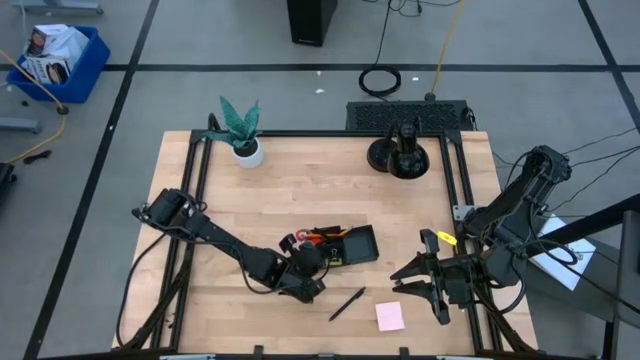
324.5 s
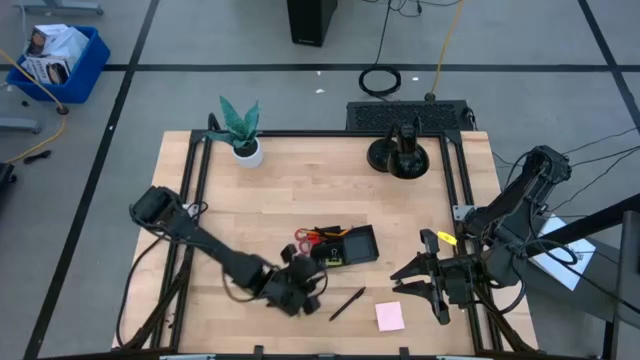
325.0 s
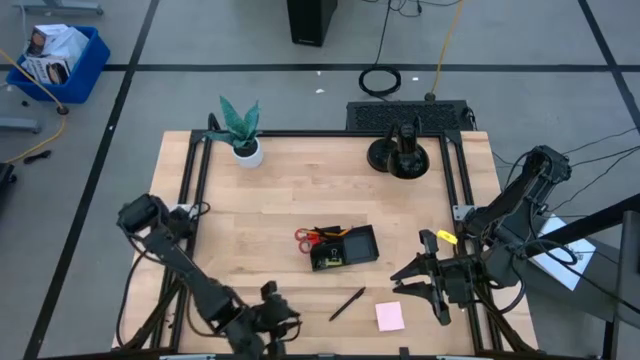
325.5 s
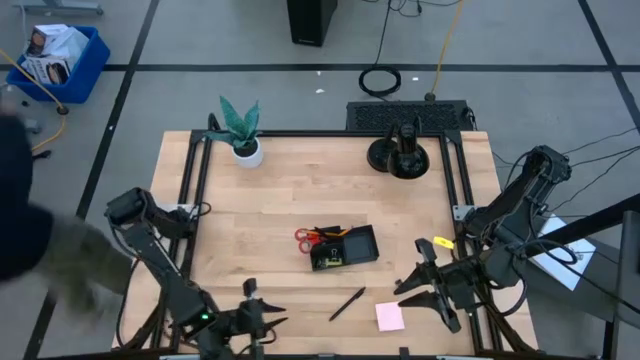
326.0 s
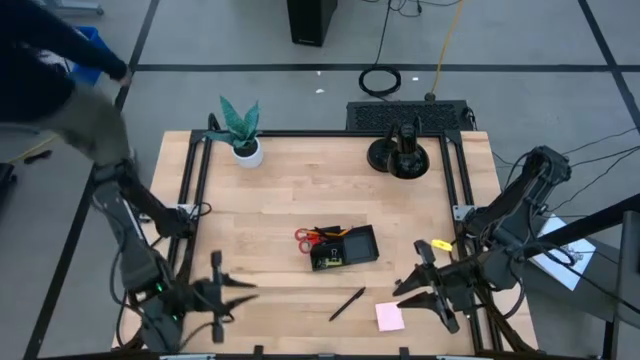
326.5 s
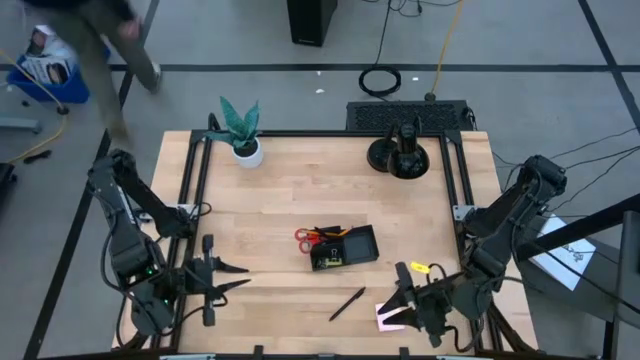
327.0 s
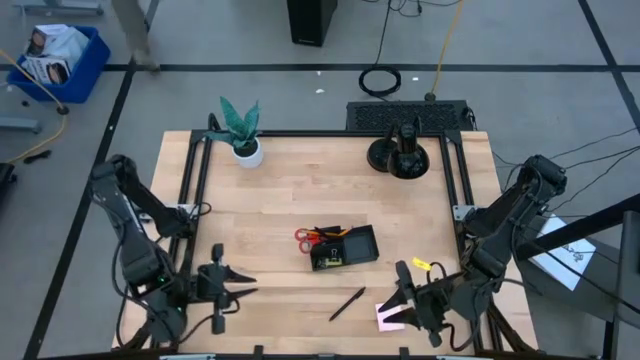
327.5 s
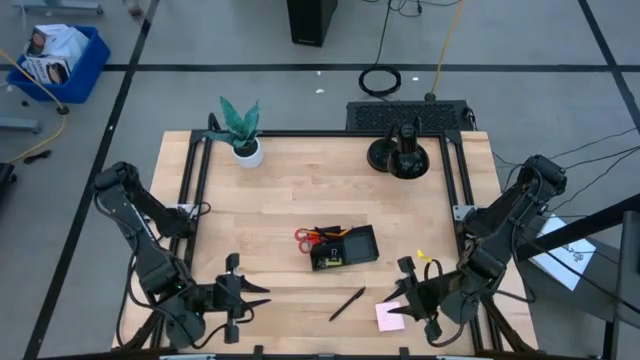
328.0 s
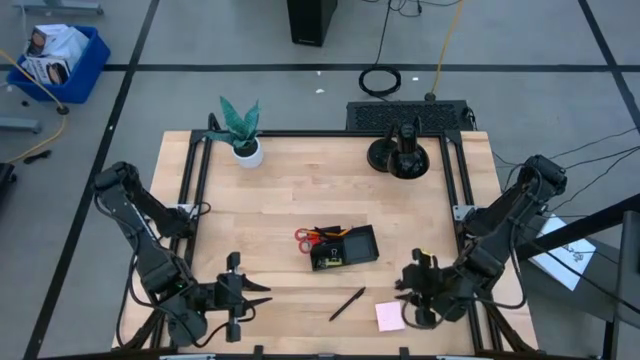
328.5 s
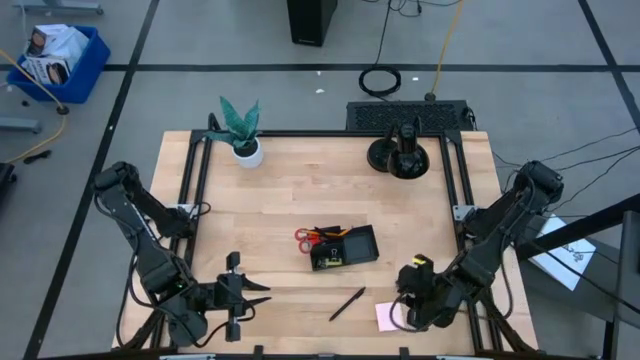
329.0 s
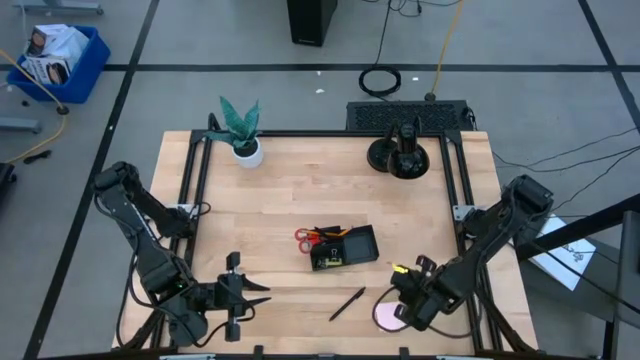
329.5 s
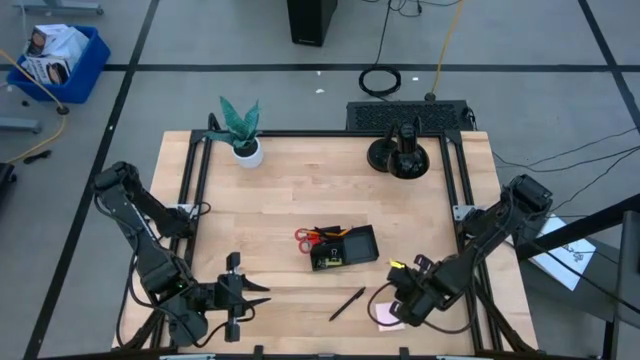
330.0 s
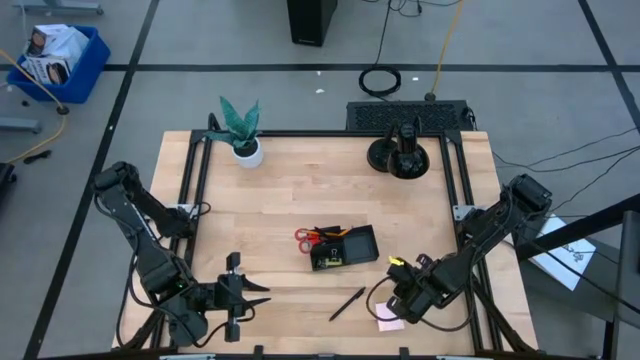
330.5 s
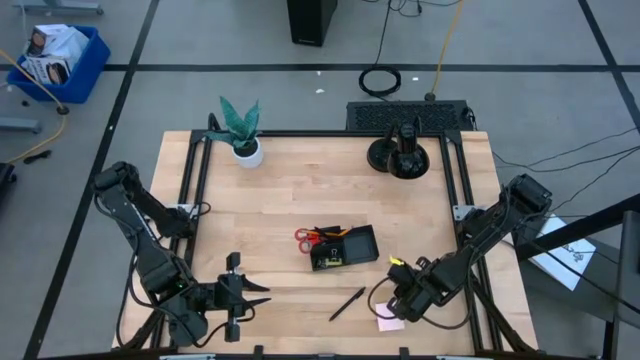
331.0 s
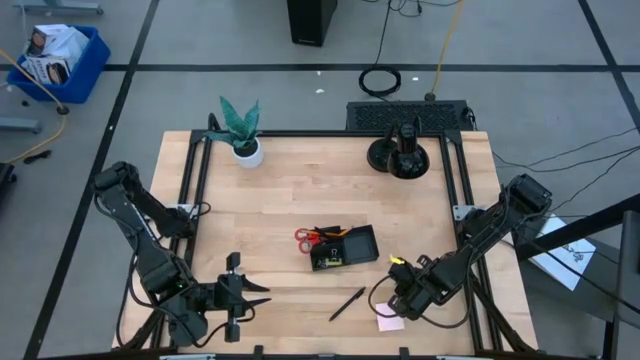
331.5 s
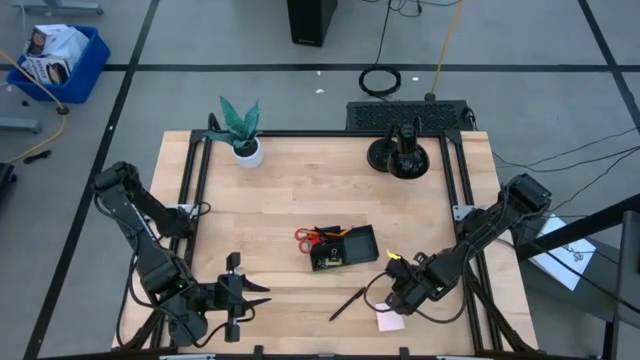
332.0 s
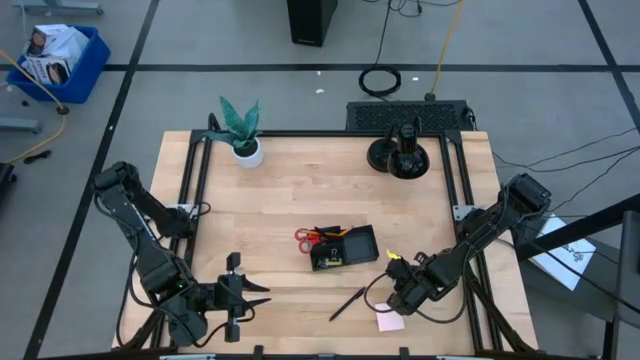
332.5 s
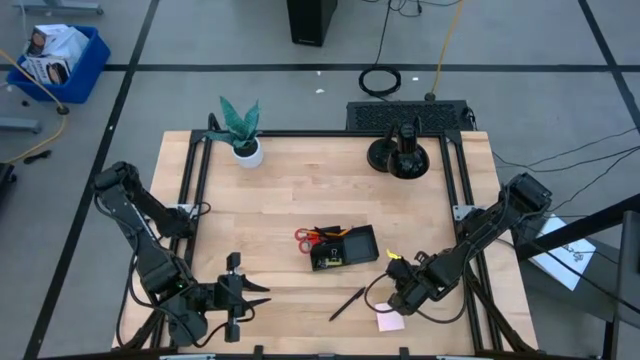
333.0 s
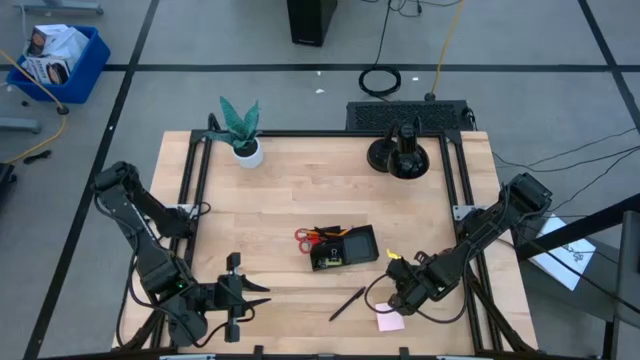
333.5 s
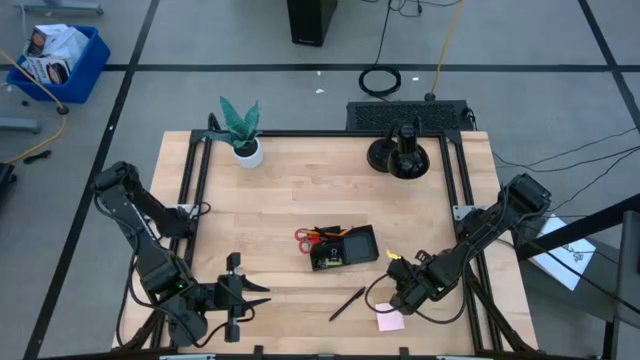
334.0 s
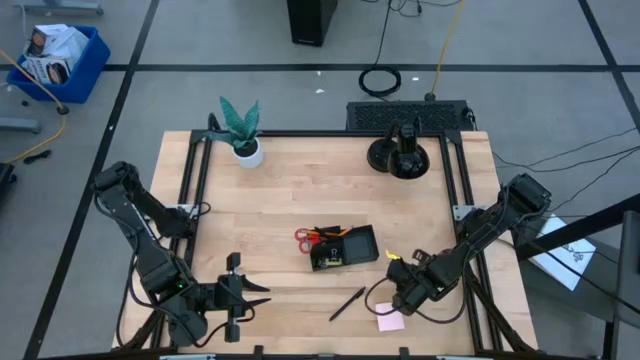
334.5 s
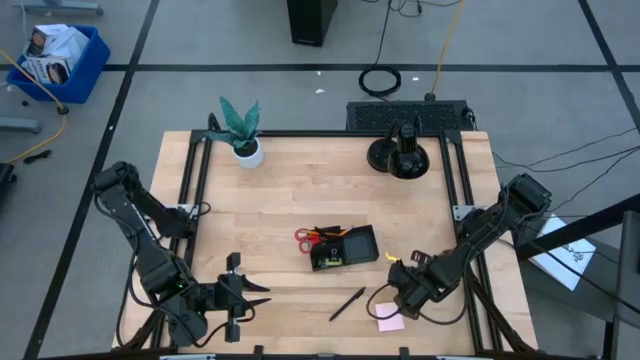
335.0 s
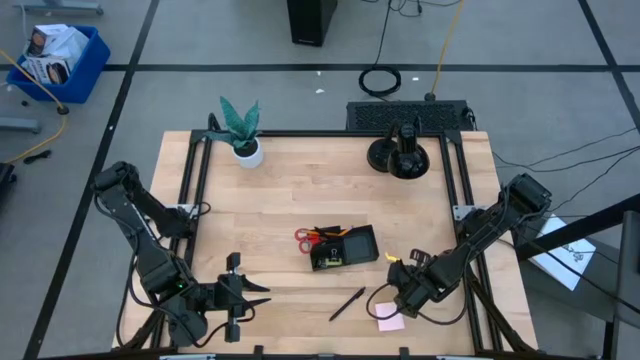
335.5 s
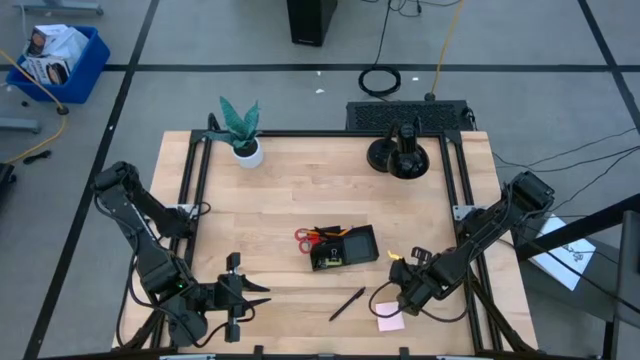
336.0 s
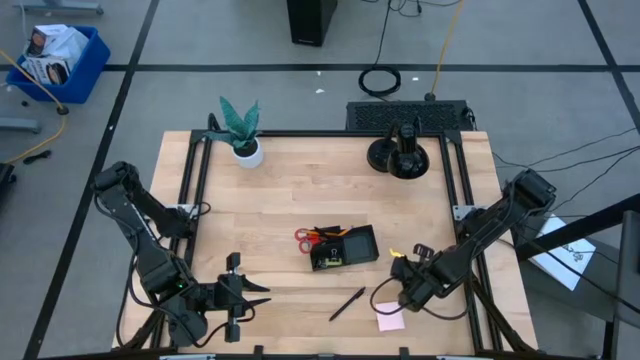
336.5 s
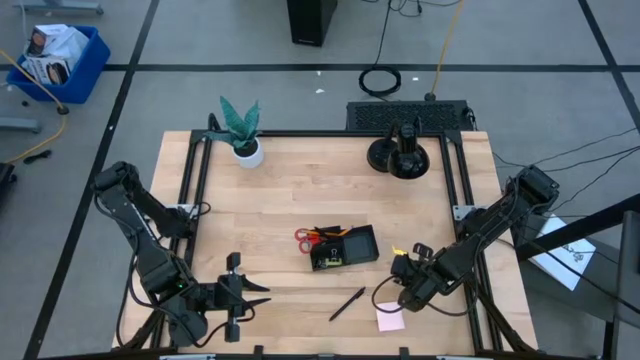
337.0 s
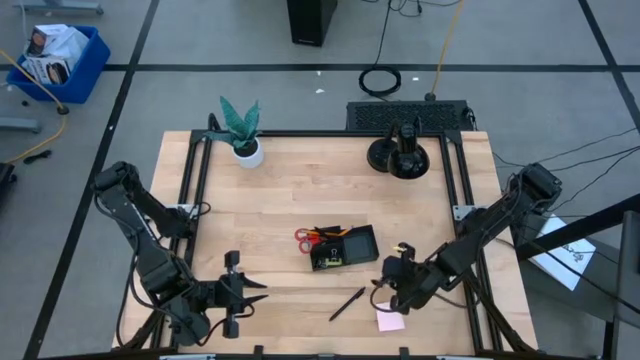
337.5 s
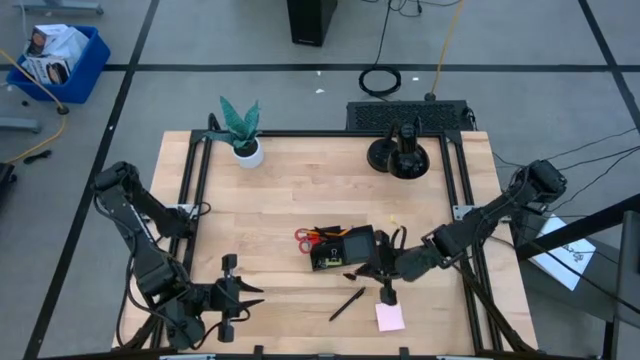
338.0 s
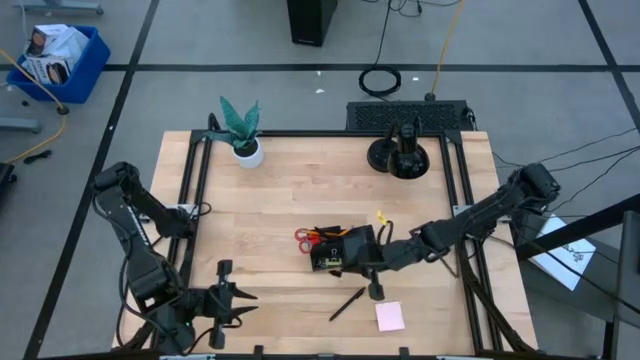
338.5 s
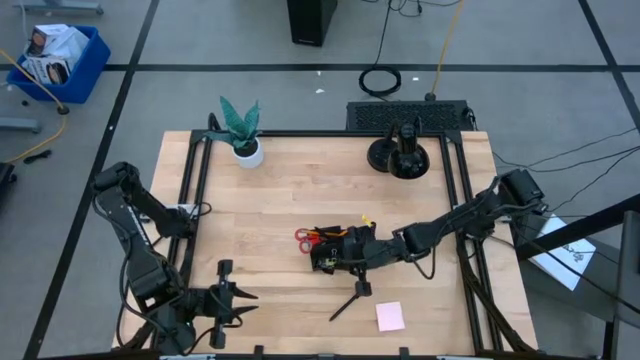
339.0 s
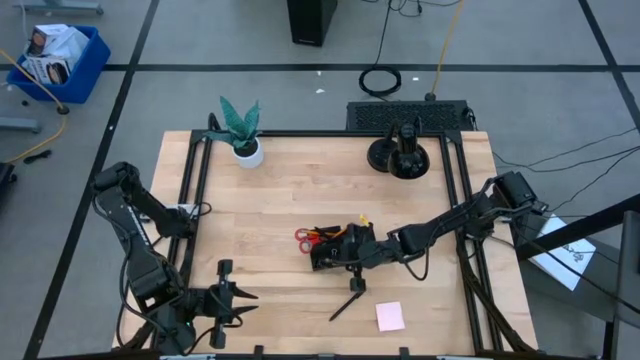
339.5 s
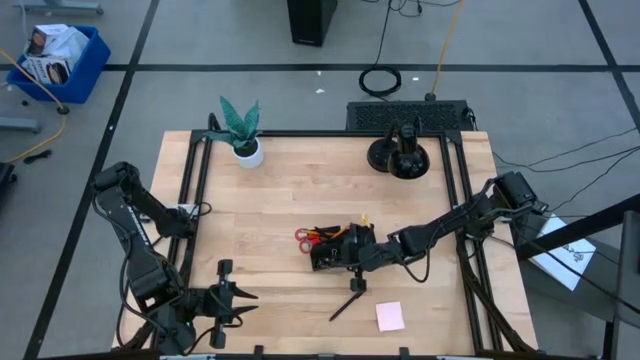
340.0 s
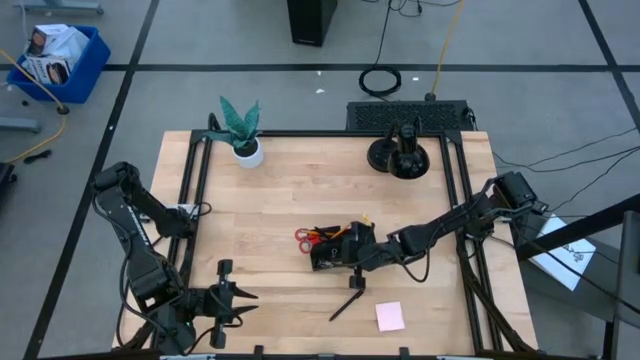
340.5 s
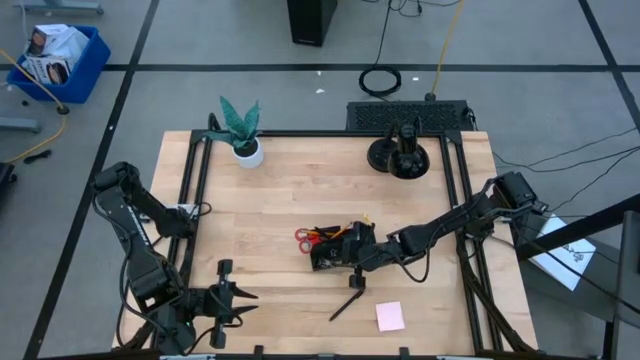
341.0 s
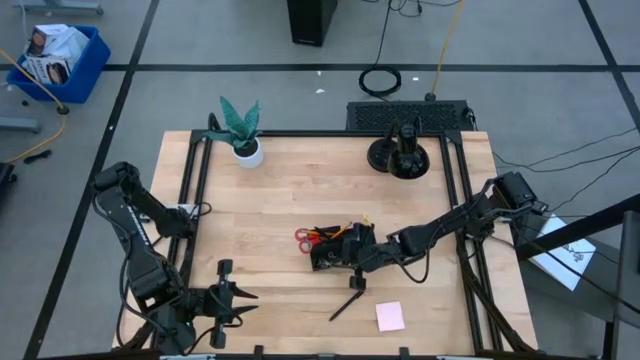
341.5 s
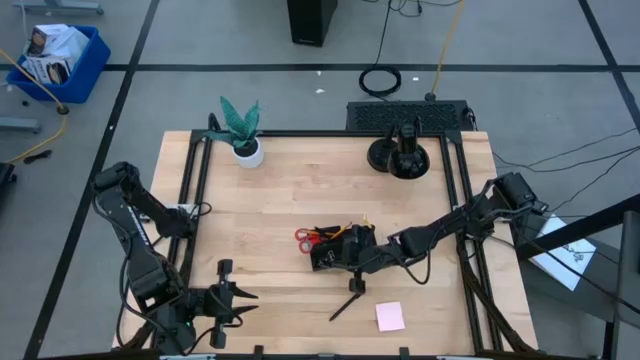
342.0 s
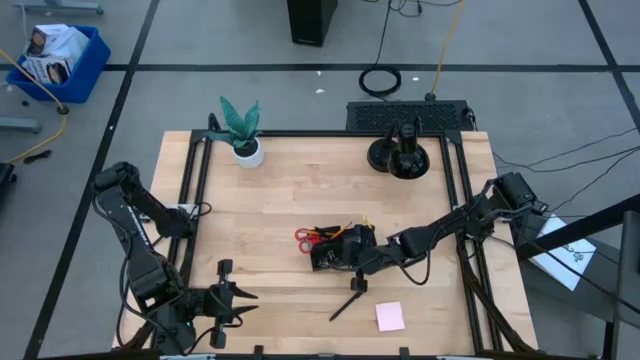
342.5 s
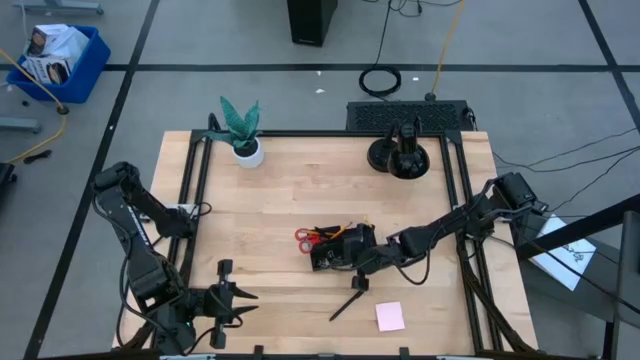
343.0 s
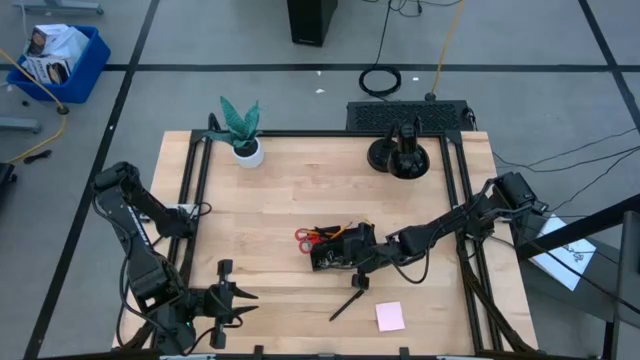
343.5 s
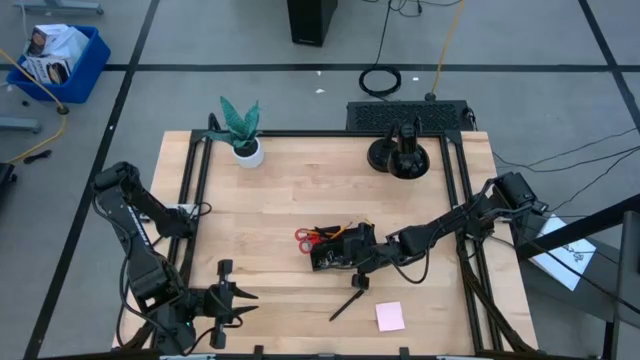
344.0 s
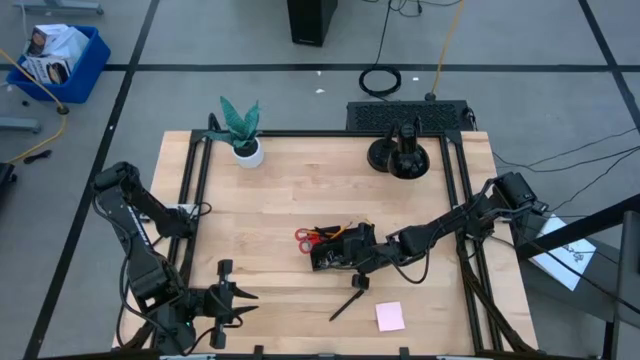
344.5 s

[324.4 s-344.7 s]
Task: Pick and place office supplies into organizer
Put the black binder clip into the black desk organizer

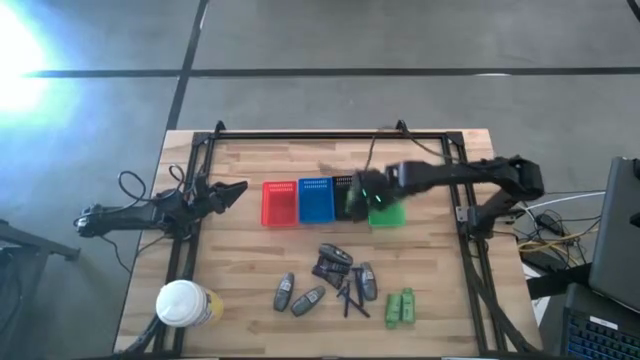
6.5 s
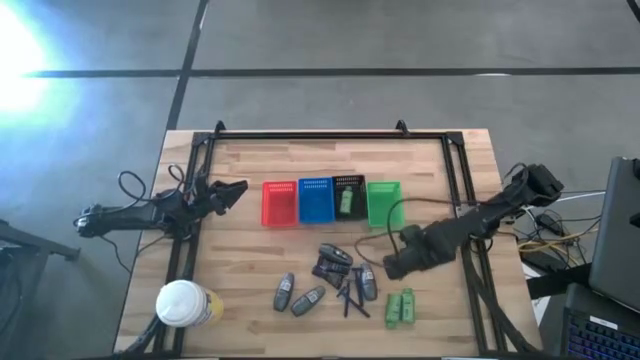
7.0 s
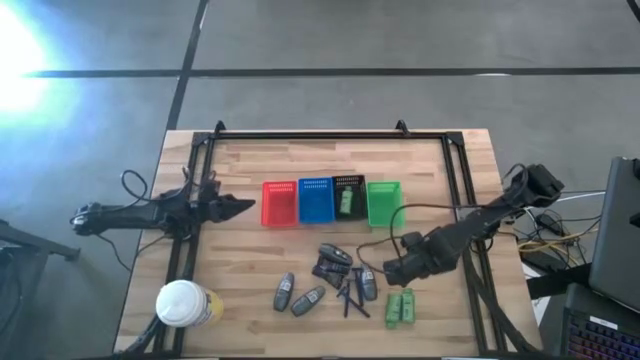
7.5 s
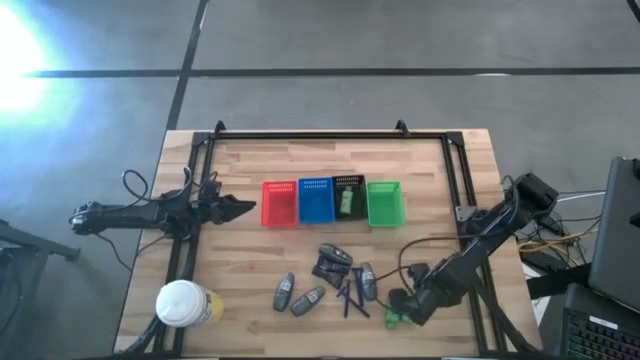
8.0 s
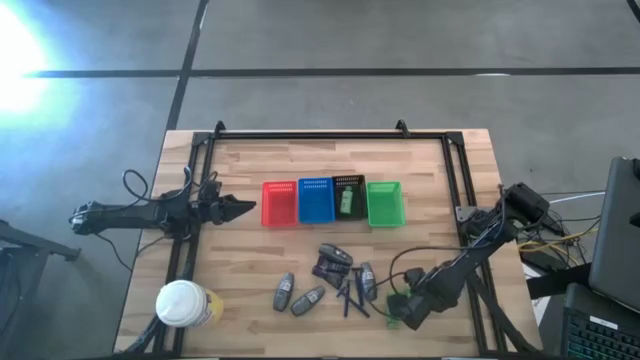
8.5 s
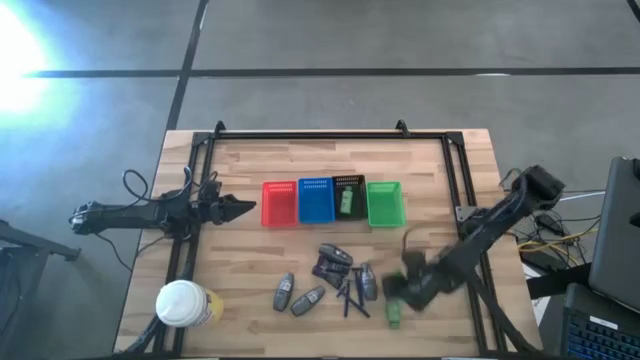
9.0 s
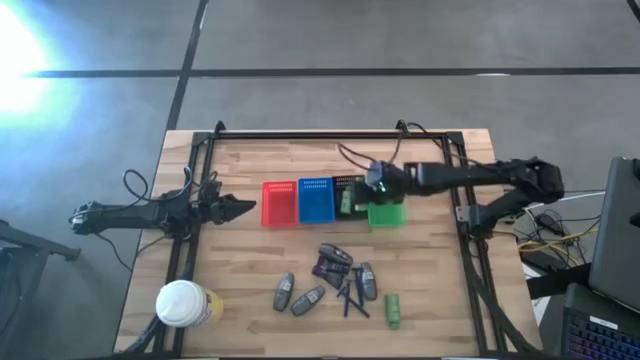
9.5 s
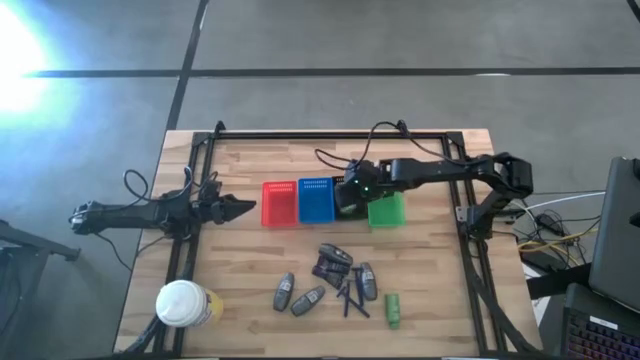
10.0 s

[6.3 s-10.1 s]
Task: Pick & Place Travel size toiletries
Put the green shampoo into the black basket
